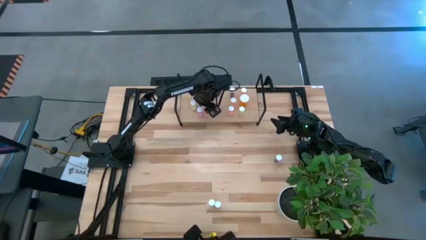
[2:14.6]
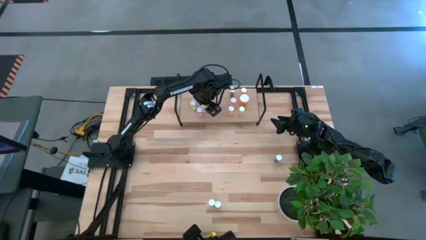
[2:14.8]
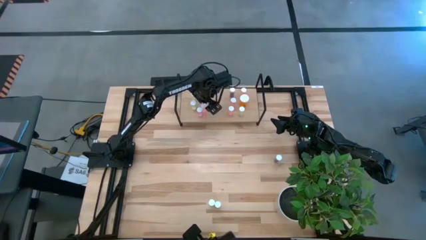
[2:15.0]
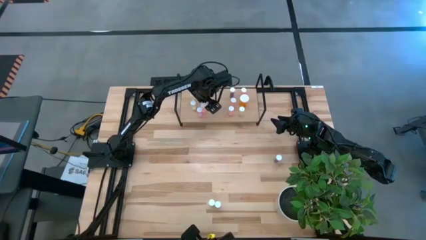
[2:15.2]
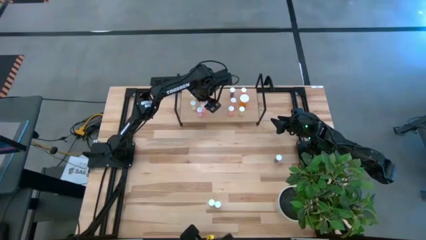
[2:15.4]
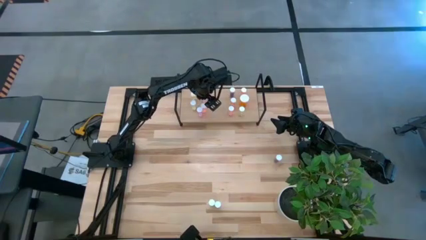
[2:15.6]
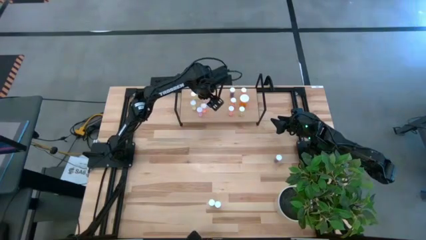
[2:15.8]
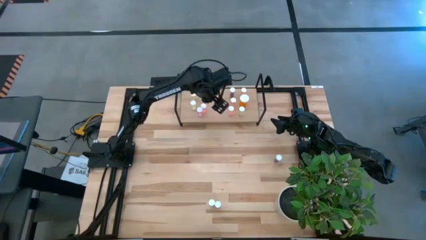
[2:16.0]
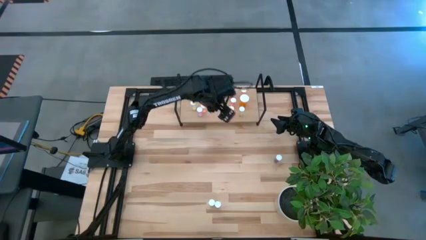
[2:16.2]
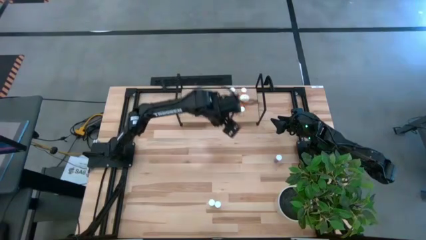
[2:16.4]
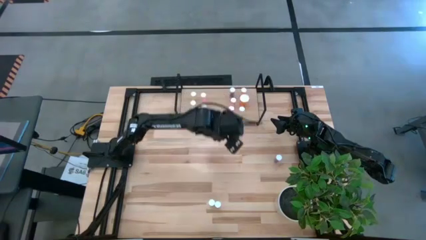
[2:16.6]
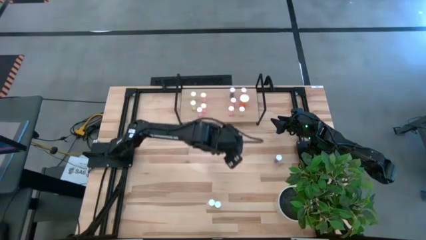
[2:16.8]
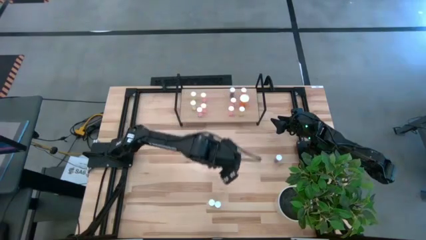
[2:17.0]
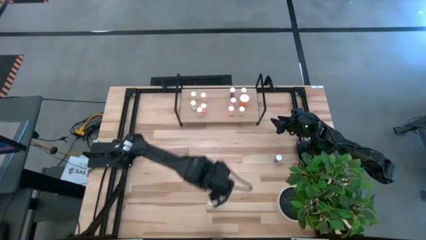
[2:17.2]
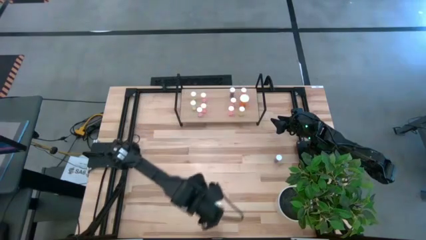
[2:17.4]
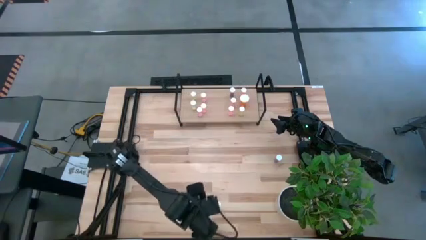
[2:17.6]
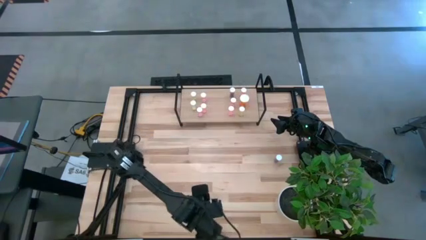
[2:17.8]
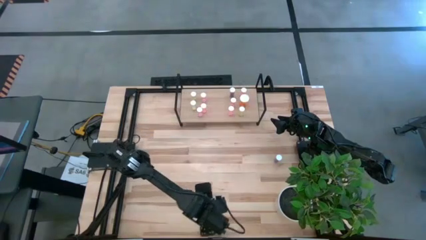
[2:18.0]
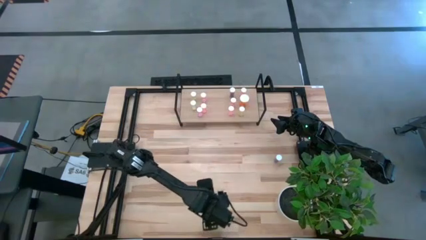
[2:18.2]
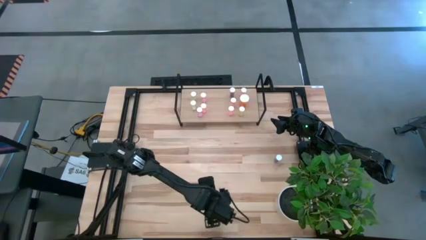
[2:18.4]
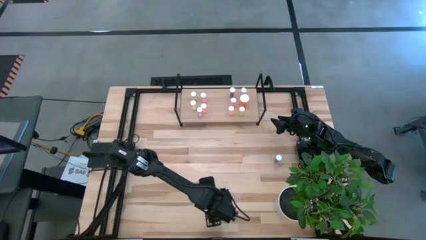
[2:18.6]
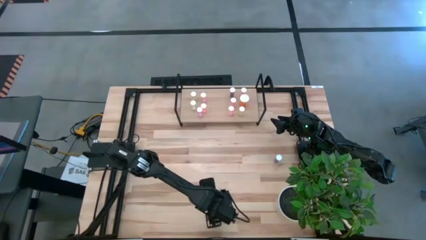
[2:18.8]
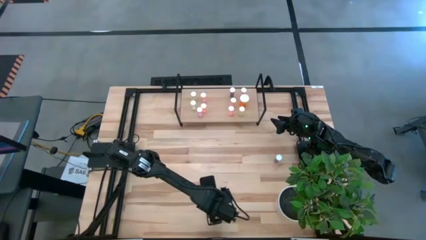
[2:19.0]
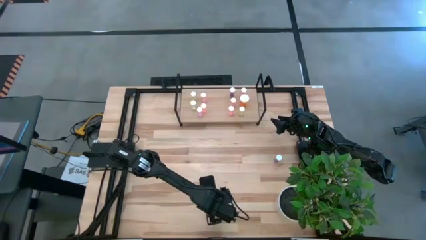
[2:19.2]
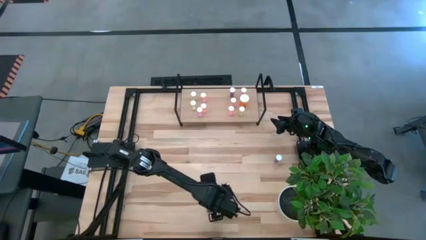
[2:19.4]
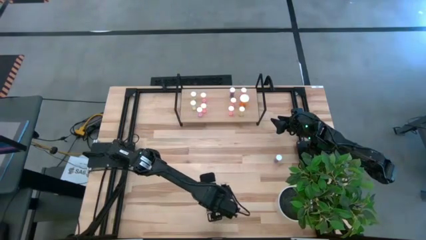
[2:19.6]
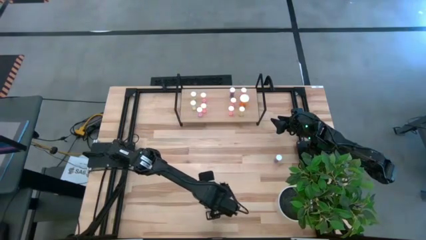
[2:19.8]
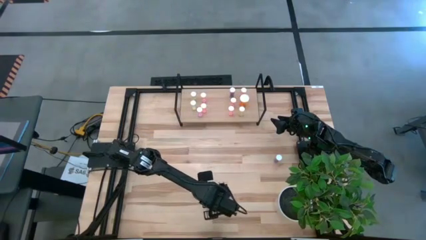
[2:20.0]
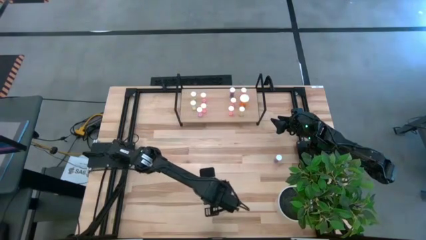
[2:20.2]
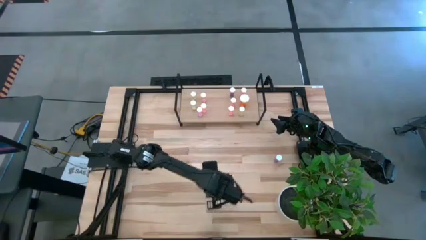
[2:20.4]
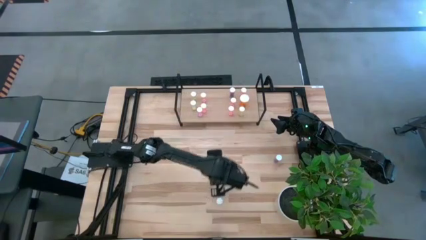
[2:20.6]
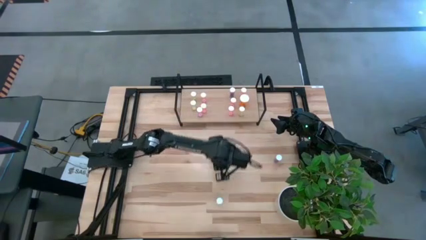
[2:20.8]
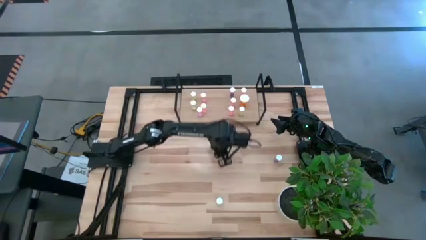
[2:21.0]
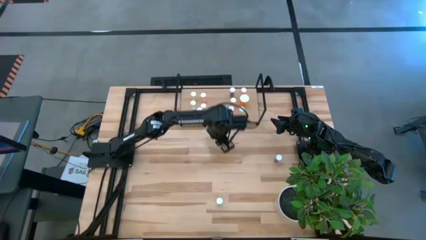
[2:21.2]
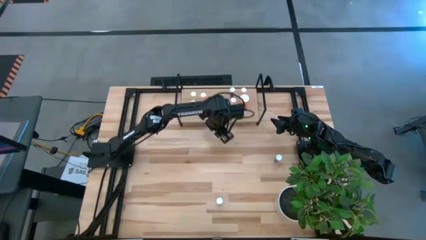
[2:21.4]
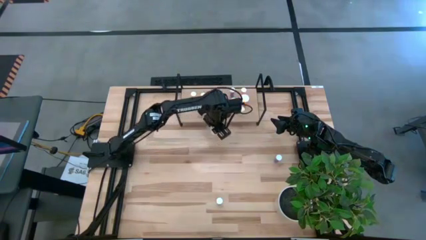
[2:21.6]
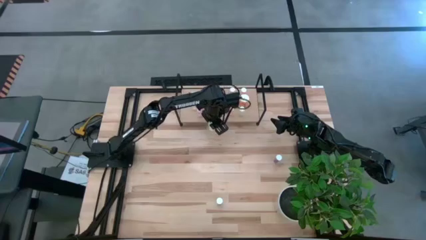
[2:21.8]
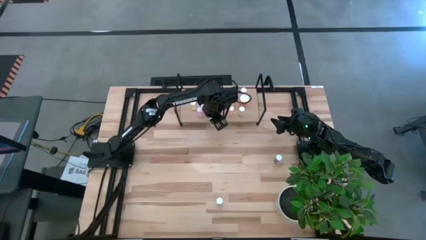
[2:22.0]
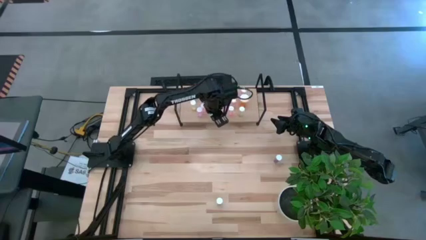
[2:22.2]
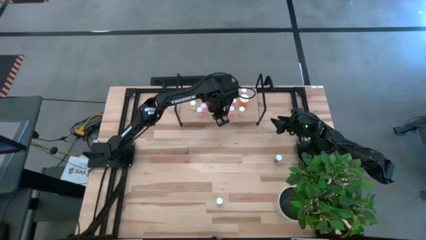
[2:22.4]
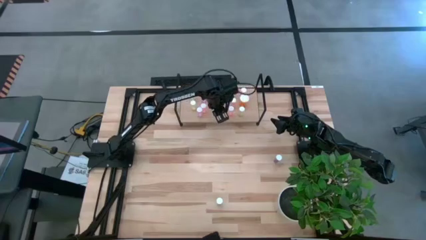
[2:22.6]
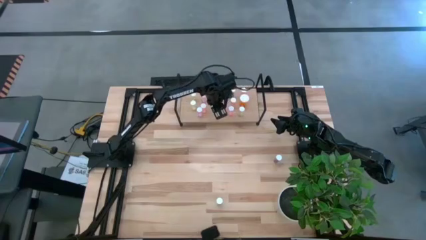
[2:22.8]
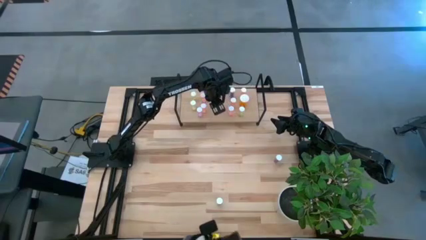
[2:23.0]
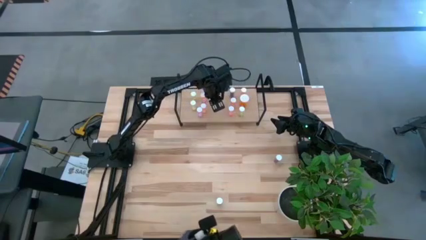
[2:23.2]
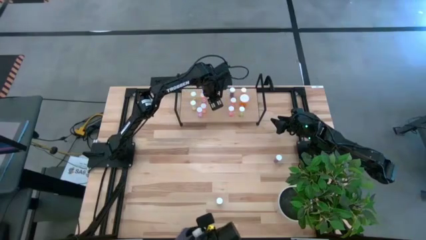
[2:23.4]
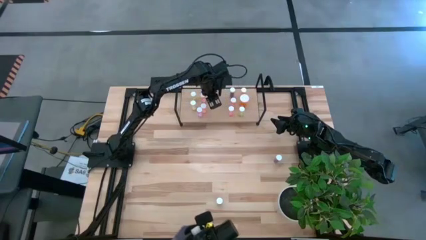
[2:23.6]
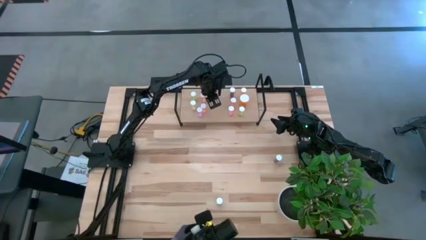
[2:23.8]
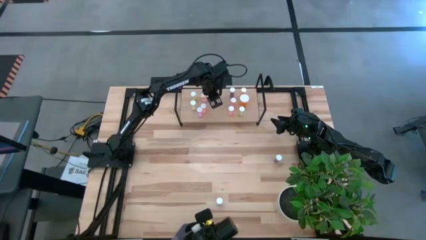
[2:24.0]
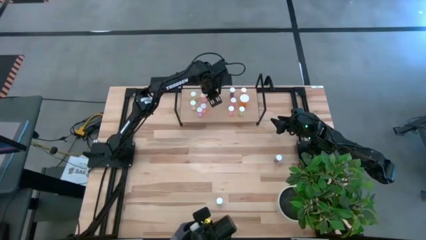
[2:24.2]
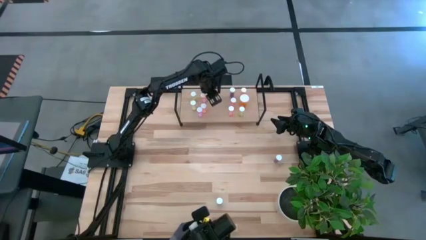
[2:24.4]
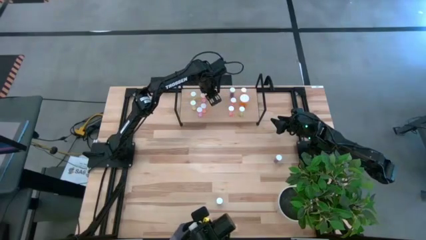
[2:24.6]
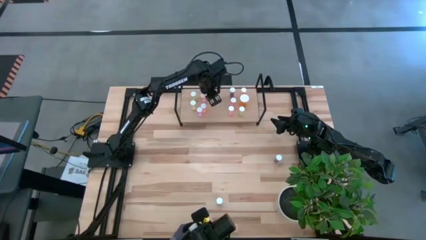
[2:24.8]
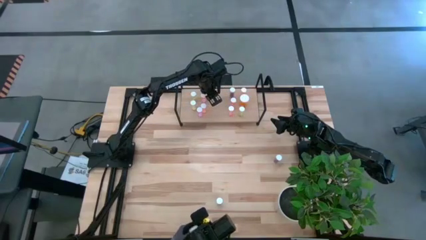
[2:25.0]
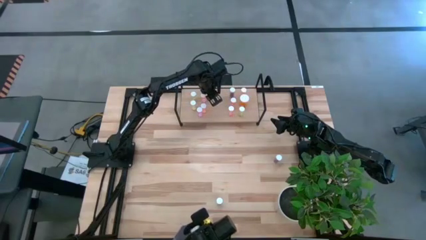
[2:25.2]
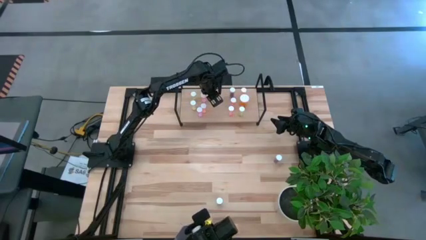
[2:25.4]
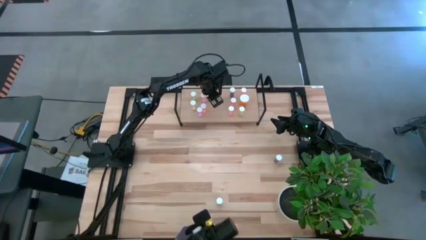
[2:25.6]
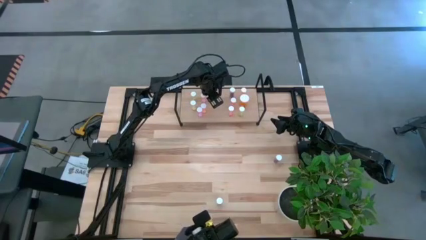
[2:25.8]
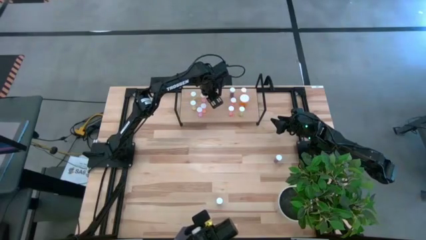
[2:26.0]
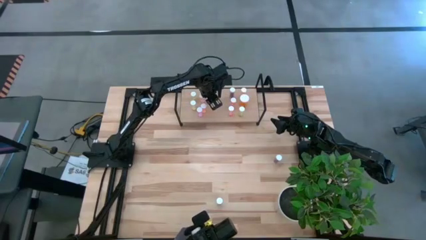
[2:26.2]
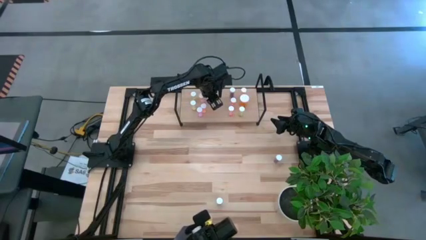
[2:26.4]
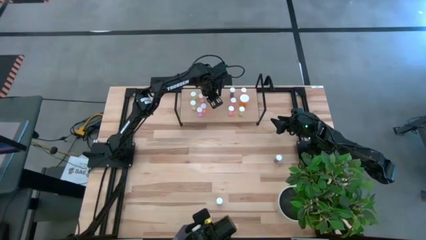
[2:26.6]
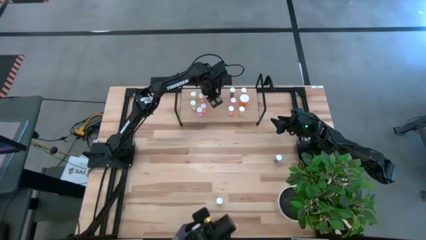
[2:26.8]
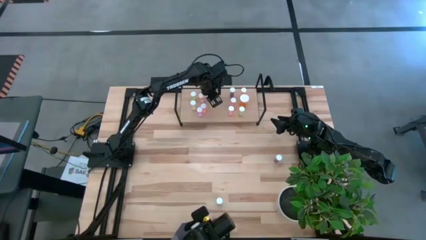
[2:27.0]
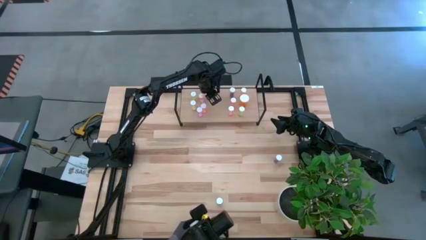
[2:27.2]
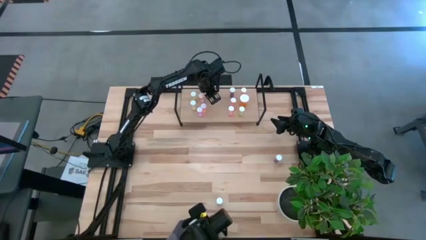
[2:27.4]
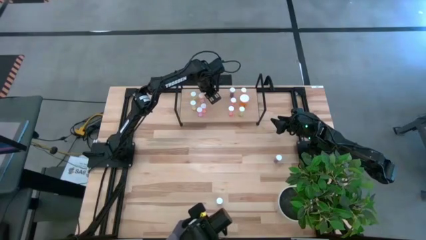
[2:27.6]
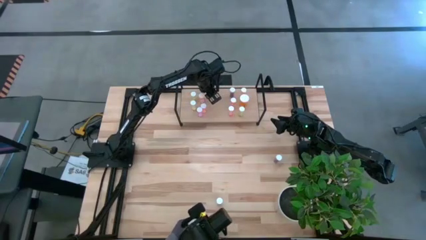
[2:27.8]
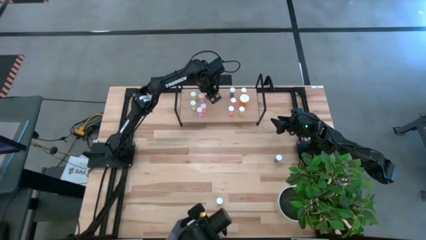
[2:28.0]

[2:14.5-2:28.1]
Task: Pick and place medicine bottles onto shelf by color
Put the yellow pill bottle on the shelf

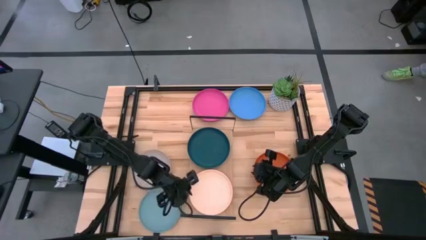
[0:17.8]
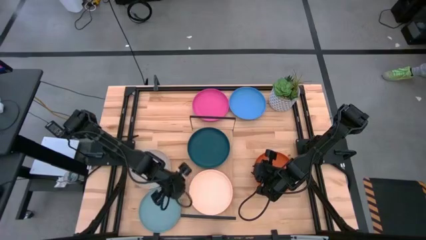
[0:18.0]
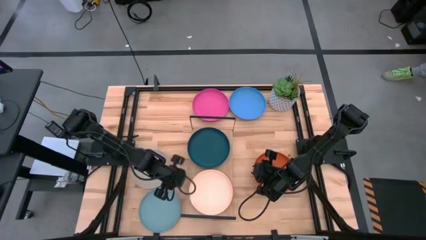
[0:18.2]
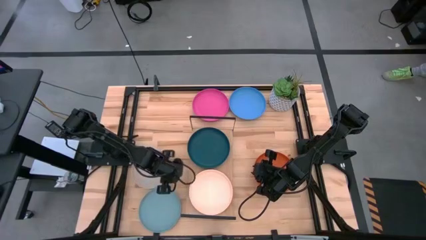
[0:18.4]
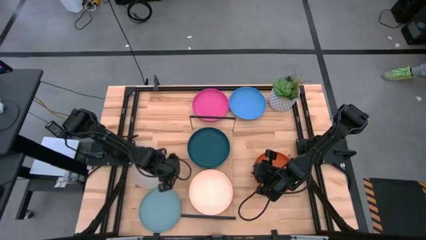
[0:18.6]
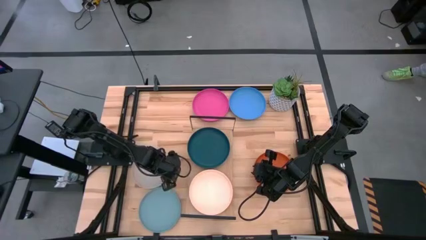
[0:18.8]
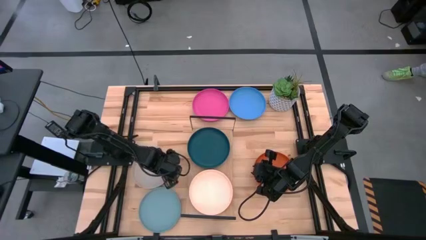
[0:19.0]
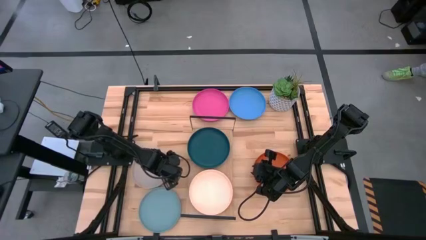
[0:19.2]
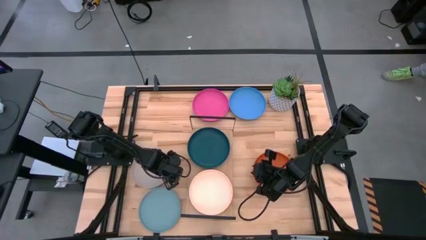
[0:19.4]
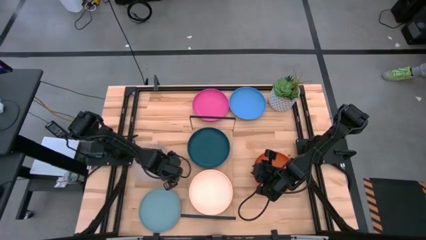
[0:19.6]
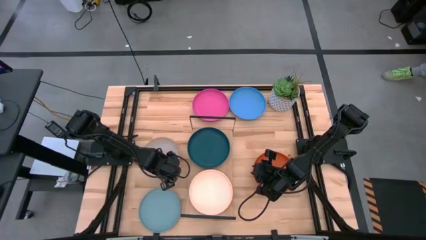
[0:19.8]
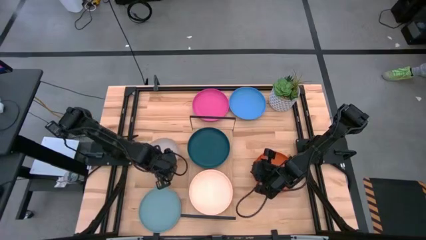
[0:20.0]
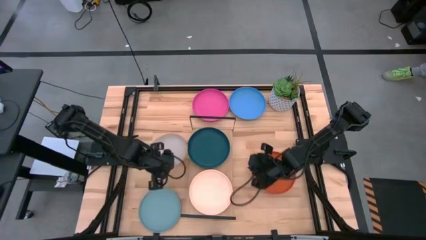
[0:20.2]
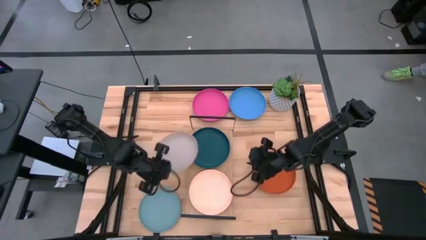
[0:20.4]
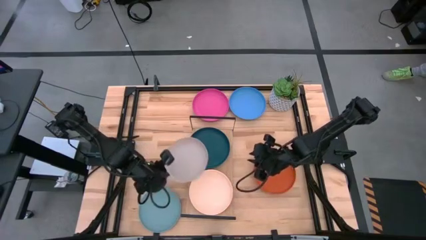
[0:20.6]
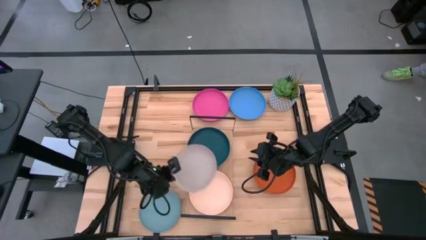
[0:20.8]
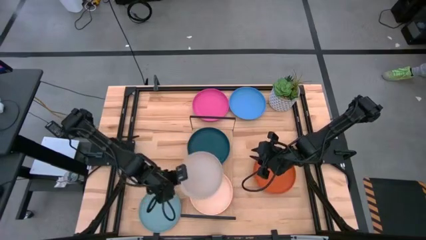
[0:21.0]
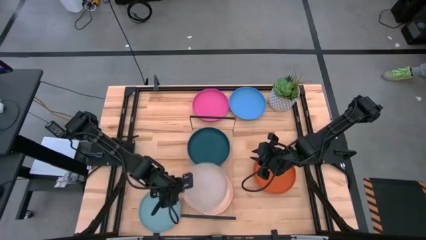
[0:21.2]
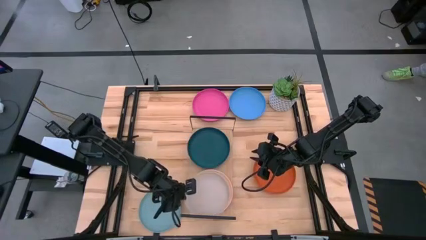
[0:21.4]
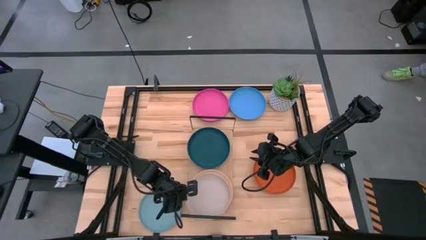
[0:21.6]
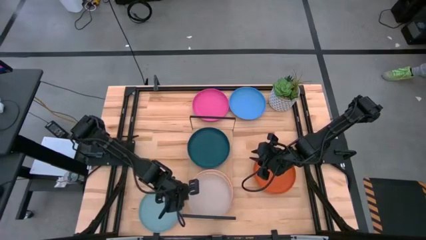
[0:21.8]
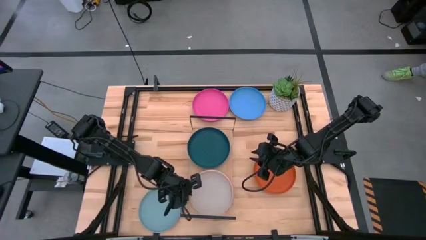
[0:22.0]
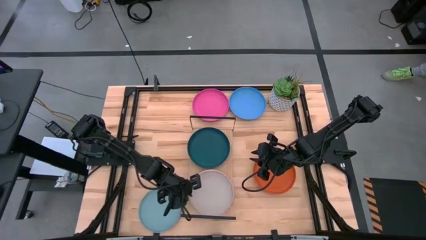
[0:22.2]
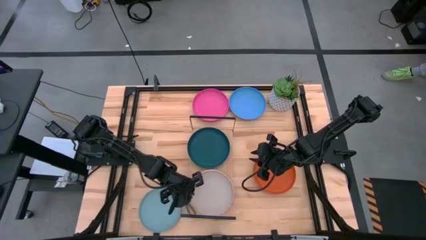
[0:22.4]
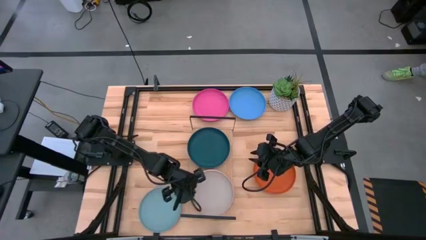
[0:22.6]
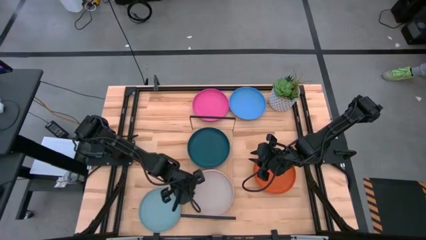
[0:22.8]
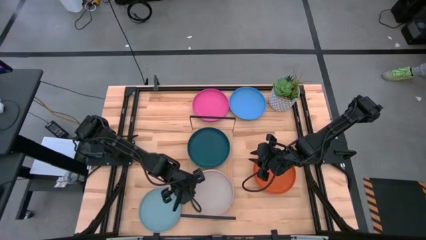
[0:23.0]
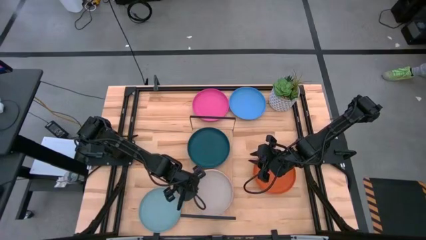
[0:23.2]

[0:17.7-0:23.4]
Task: Place and stack plates onto a shelf
Stack the gray plate on top of the white plate on the shelf
